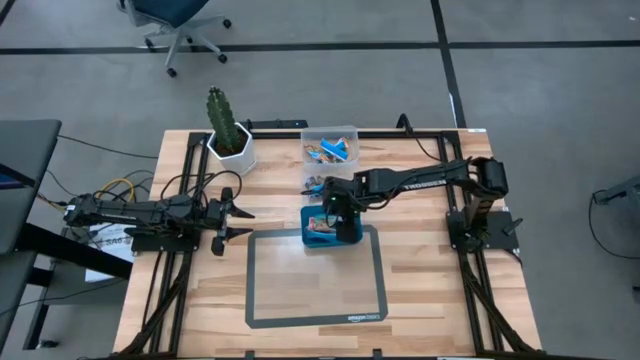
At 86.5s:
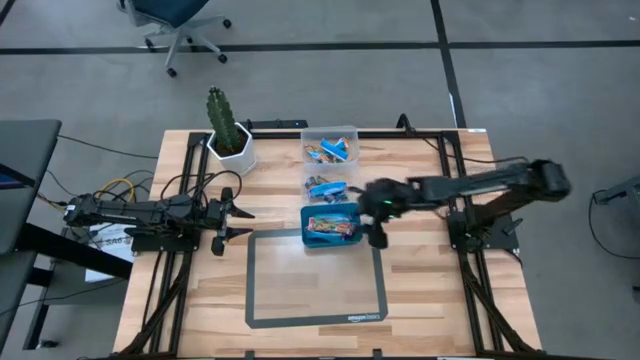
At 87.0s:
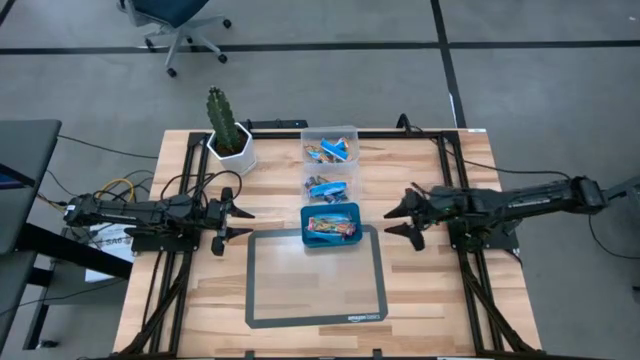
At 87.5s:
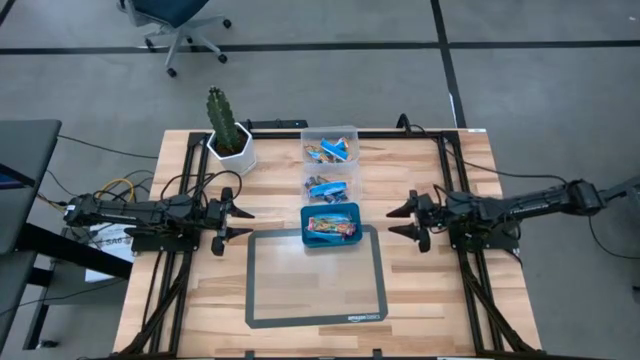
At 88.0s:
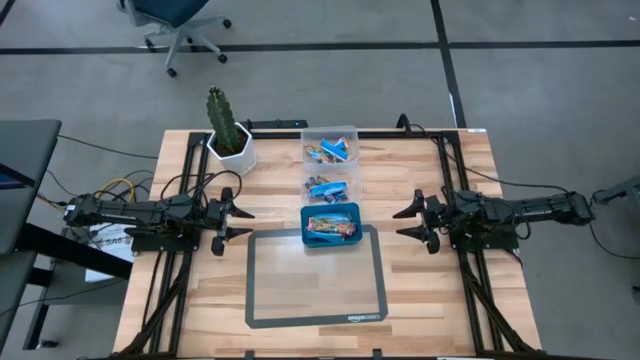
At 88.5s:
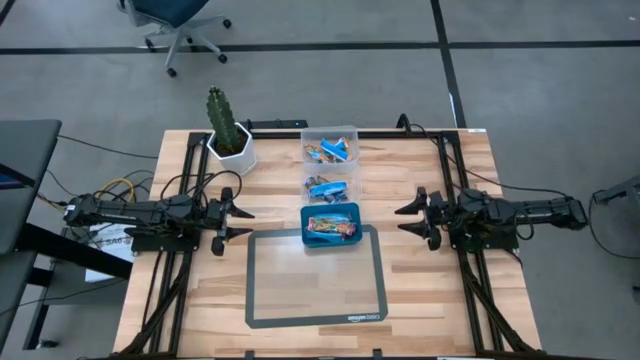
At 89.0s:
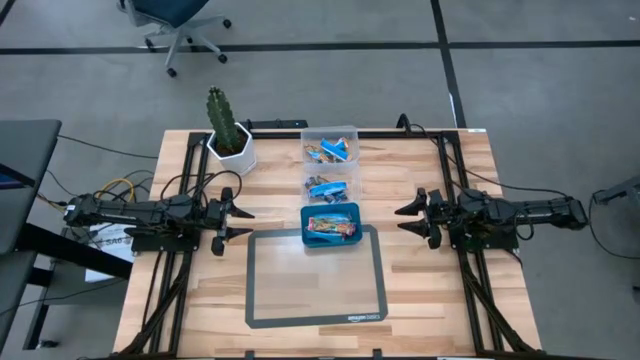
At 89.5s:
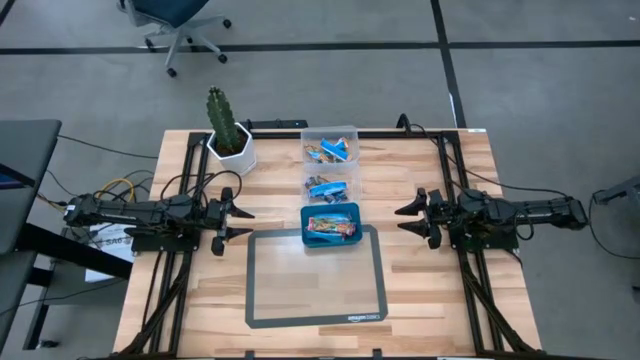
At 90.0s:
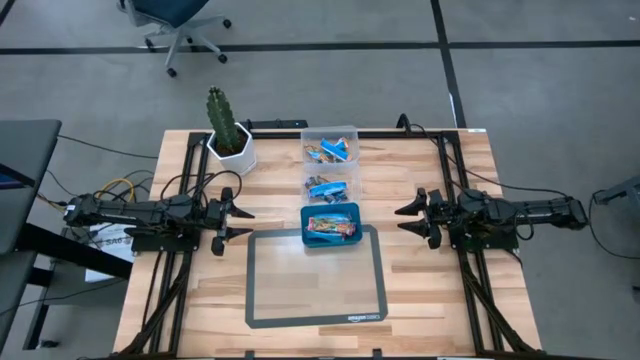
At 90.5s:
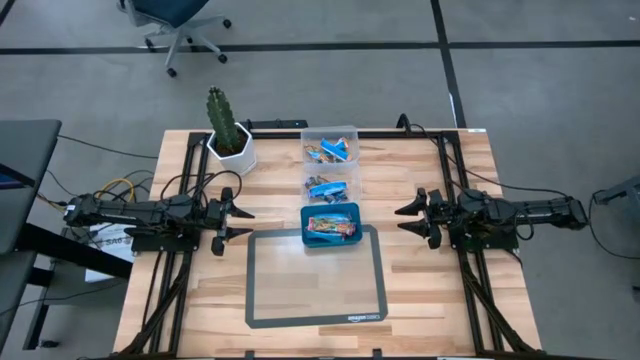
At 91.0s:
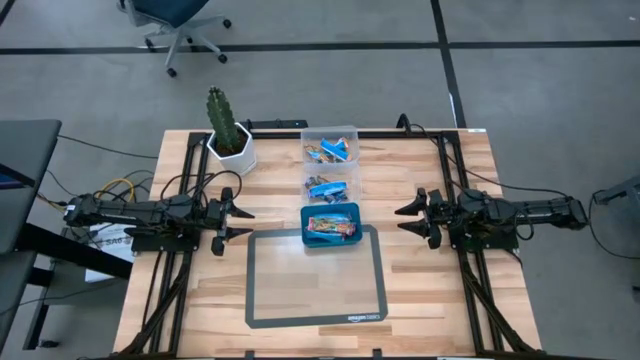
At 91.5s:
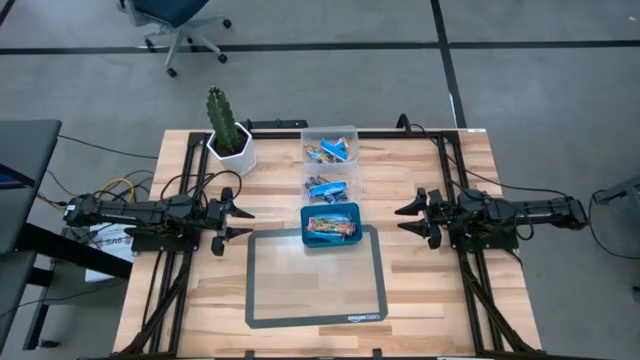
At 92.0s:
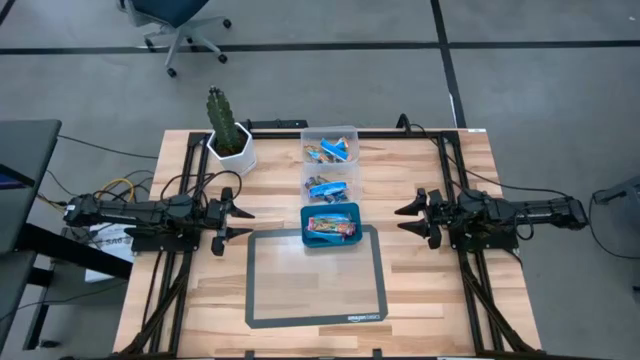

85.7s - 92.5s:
Task: Pick and place Granola Bars by type
Return to Home Position

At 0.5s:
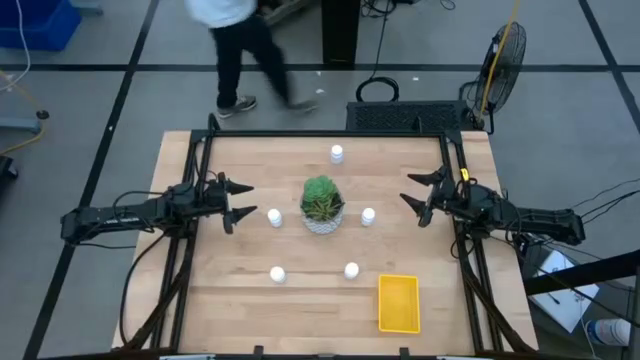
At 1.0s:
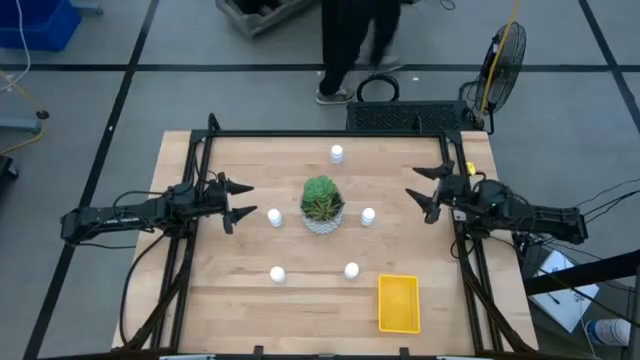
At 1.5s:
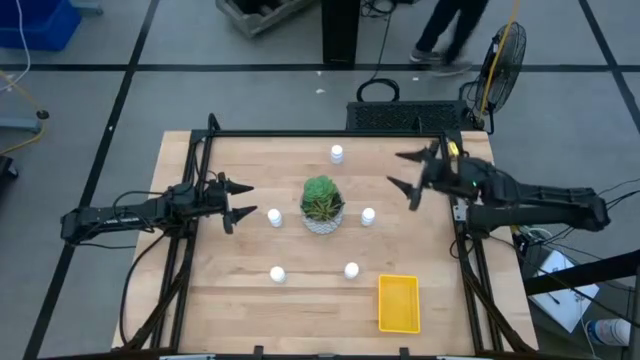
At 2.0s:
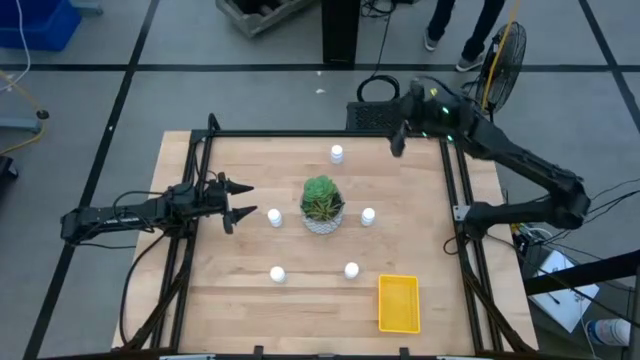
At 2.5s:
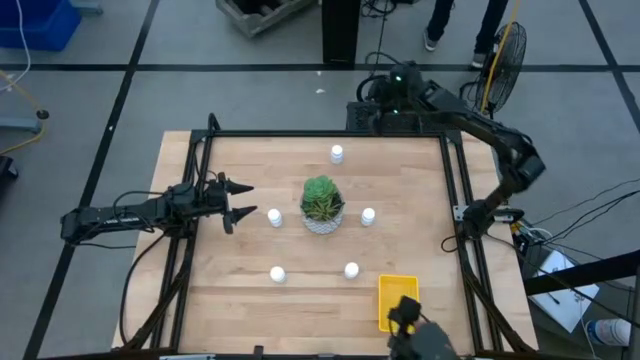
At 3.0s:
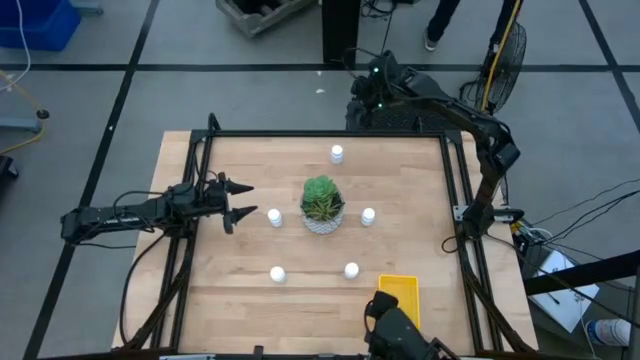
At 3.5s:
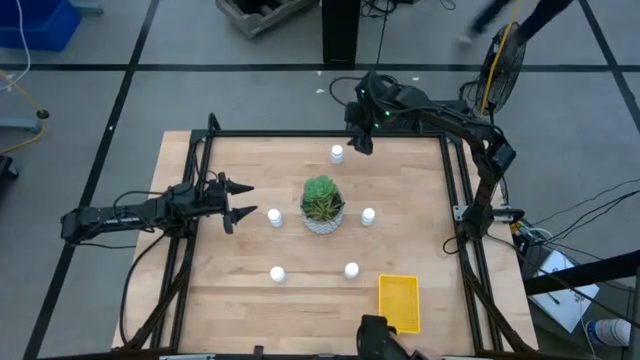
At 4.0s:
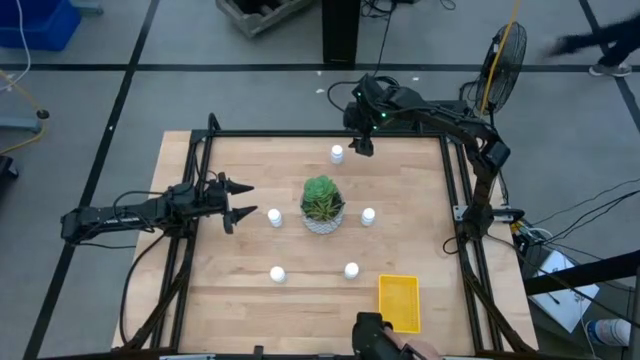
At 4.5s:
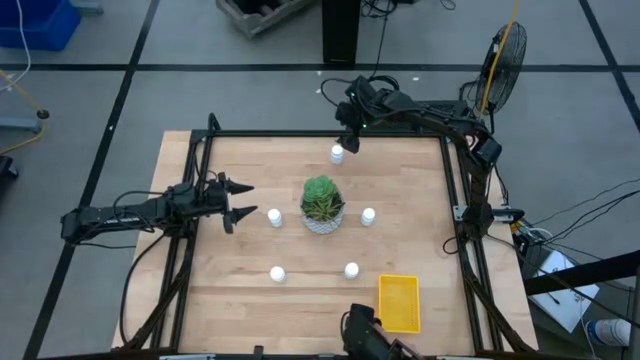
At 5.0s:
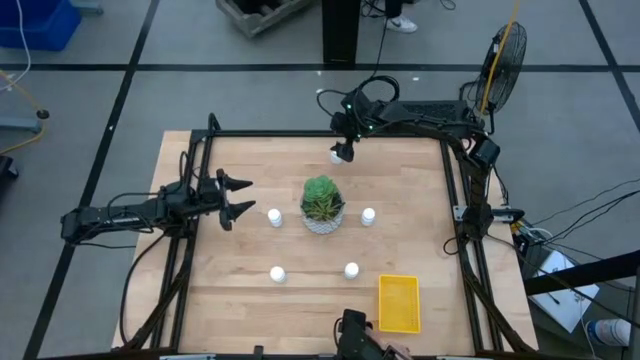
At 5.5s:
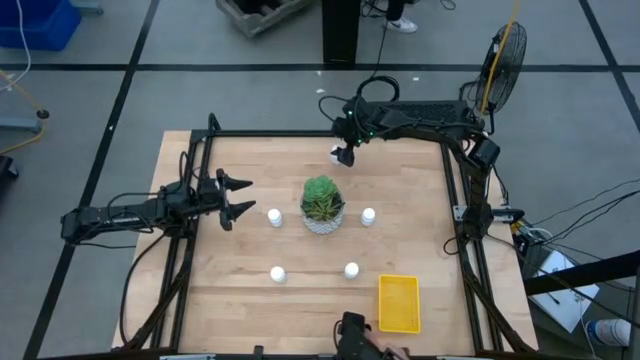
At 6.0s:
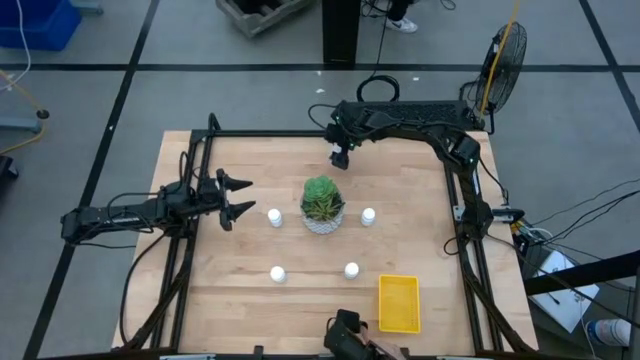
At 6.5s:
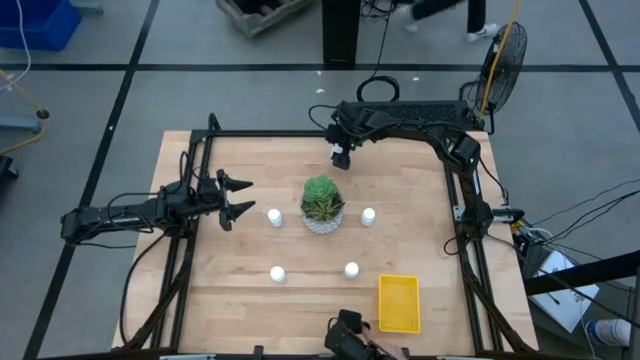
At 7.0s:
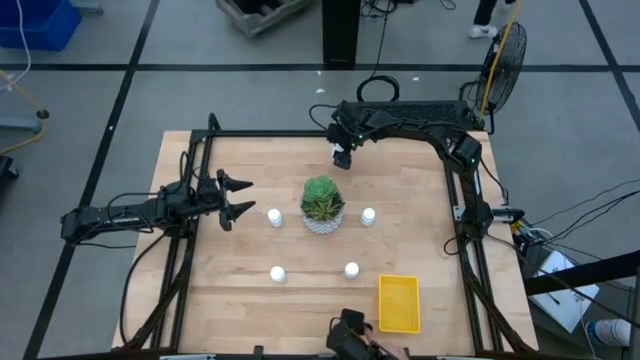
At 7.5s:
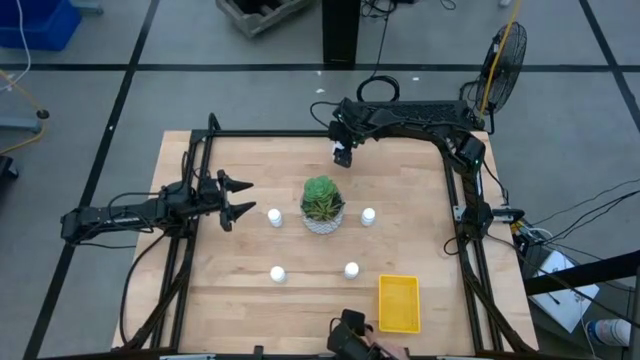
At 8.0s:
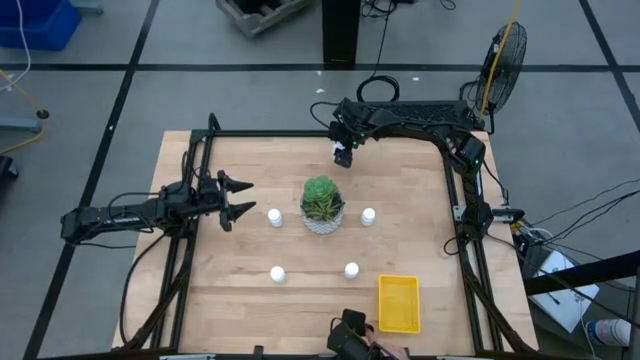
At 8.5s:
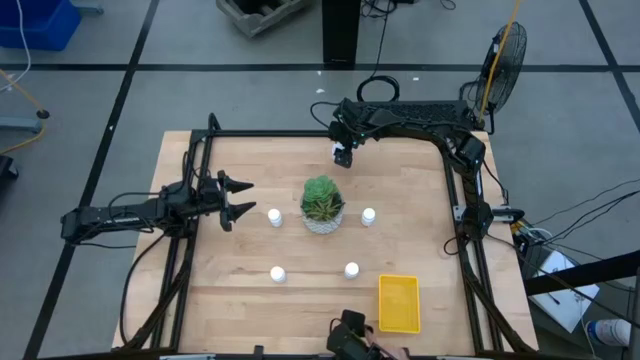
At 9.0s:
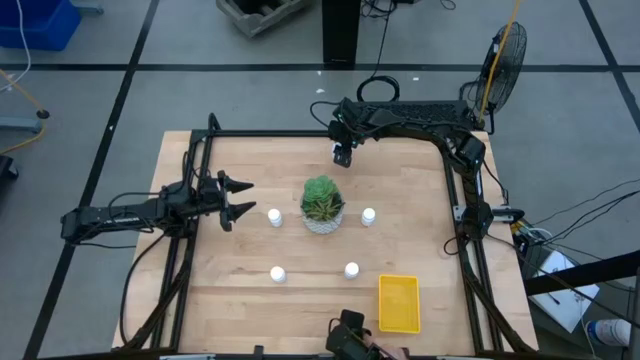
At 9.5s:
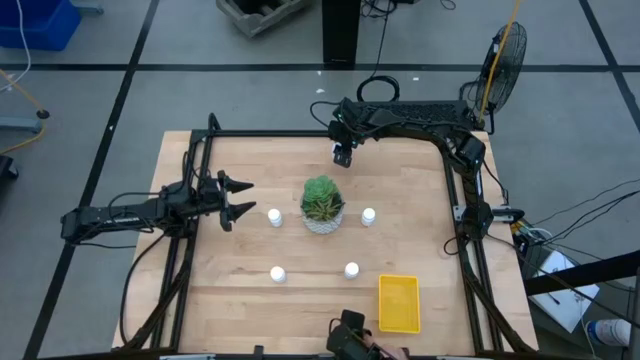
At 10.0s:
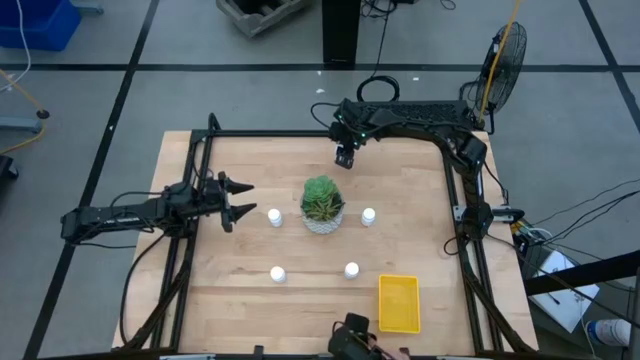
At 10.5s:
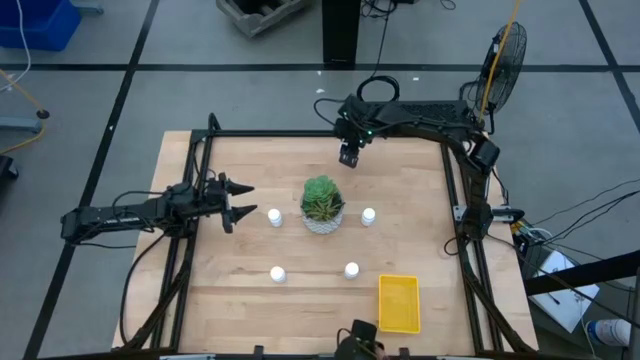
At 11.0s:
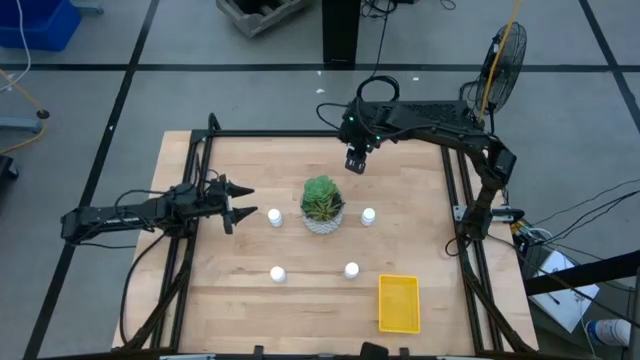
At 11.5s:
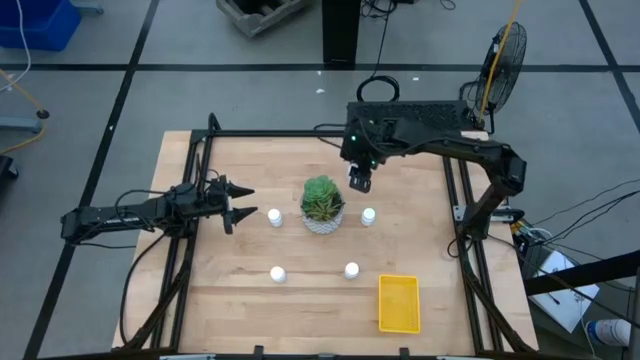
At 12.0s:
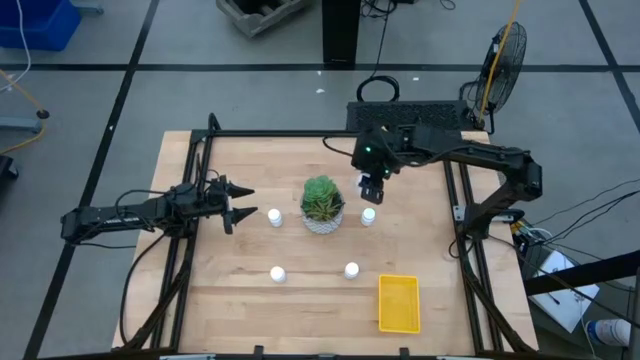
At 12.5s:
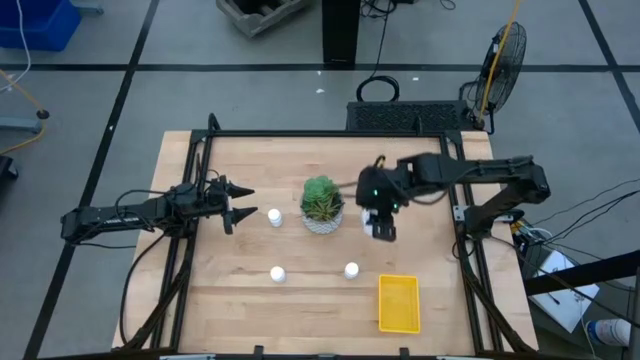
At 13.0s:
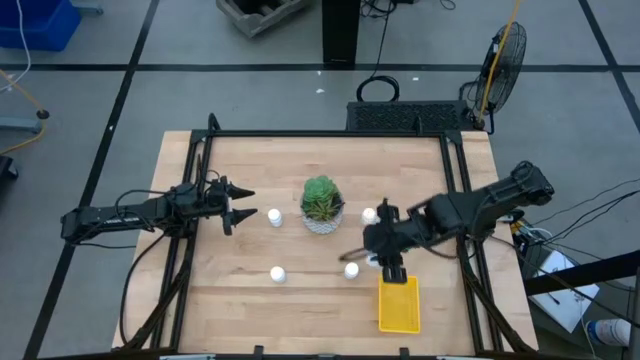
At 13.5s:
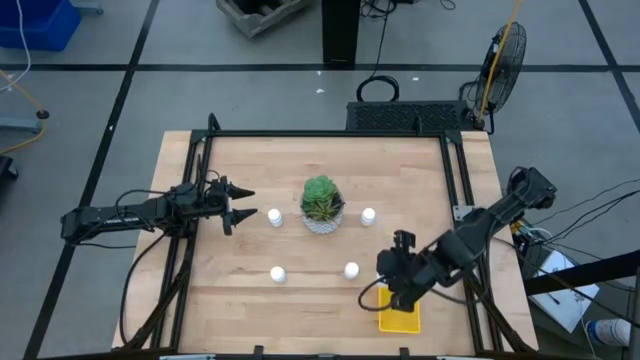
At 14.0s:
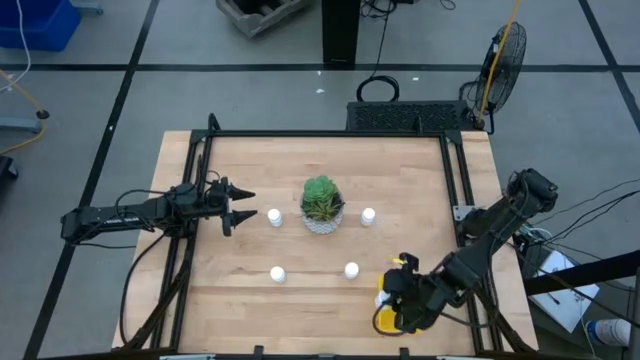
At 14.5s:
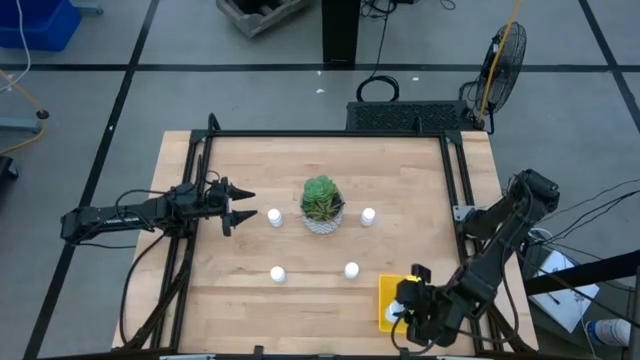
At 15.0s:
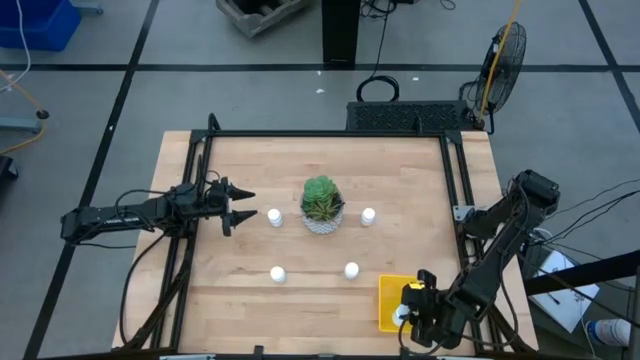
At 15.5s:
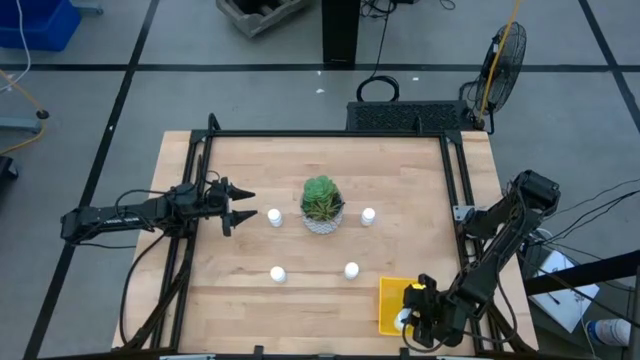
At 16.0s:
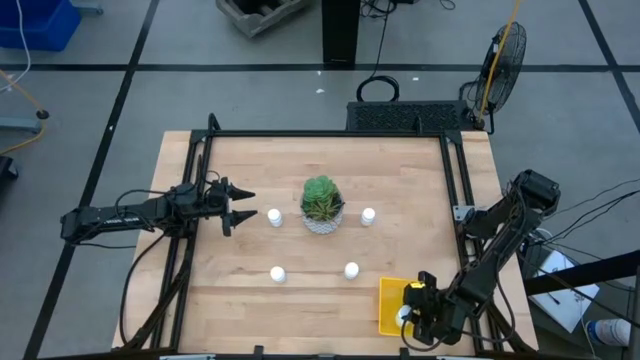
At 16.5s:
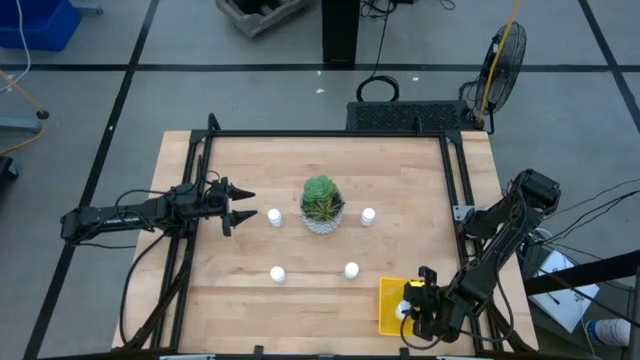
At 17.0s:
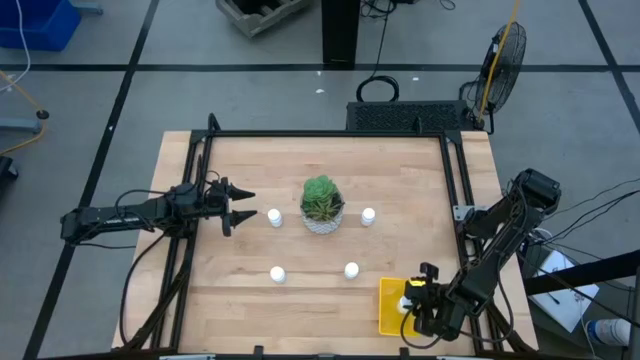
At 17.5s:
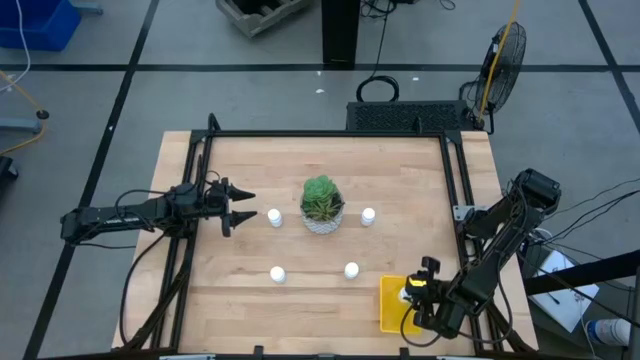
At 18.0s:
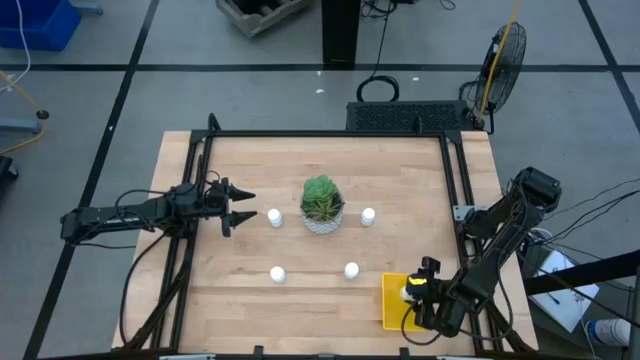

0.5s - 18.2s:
Task: Pick and place pill bottles into a basket
Put the white pill bottle into the bin
